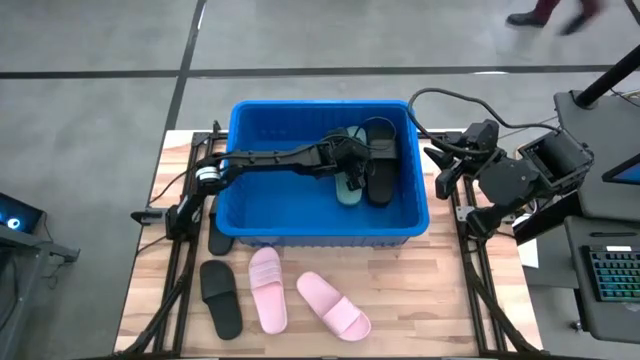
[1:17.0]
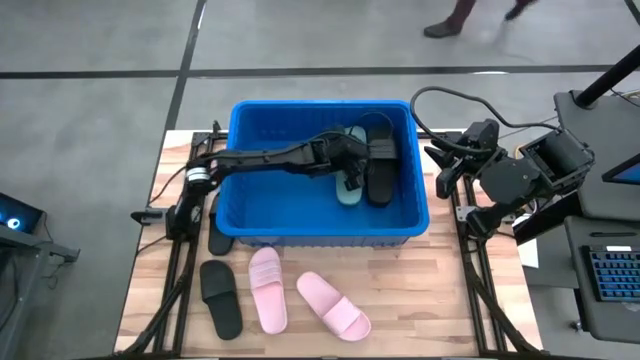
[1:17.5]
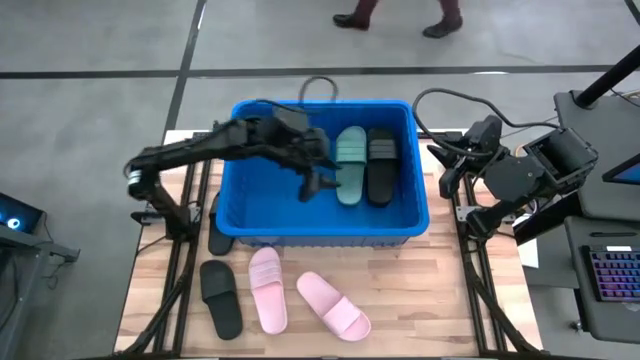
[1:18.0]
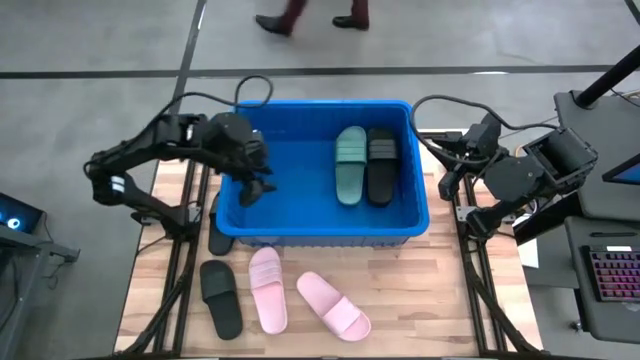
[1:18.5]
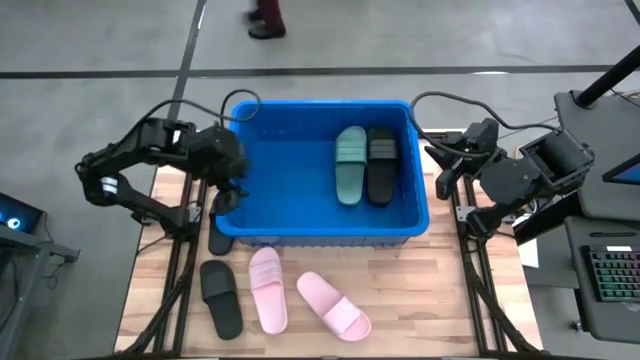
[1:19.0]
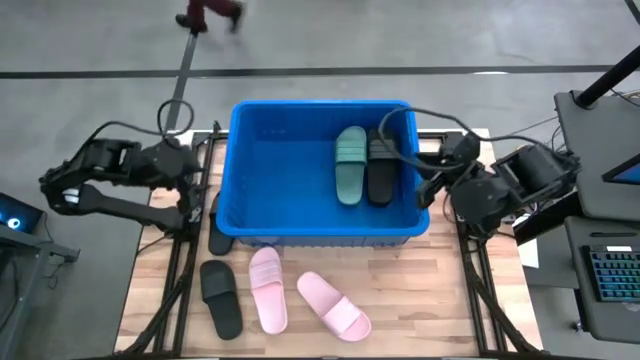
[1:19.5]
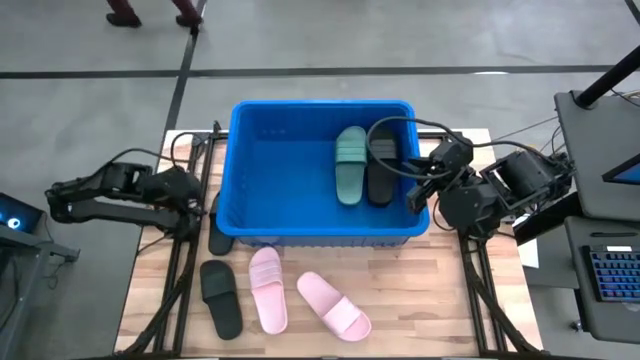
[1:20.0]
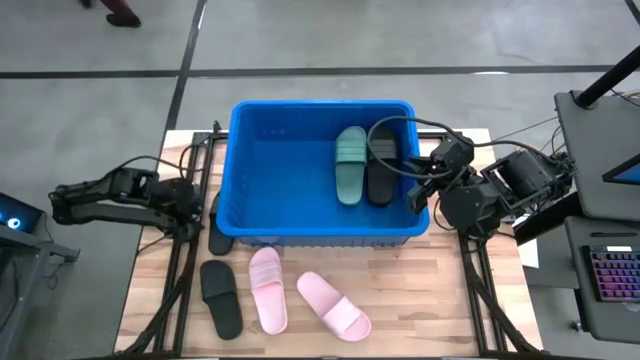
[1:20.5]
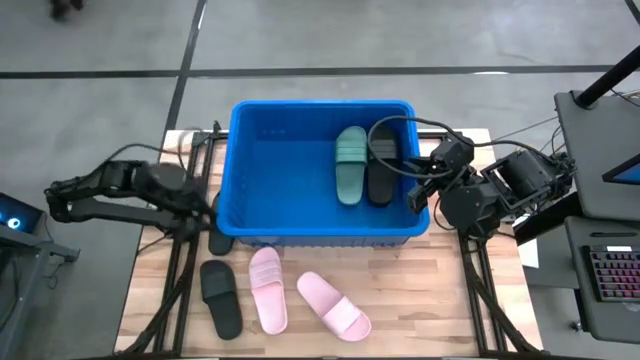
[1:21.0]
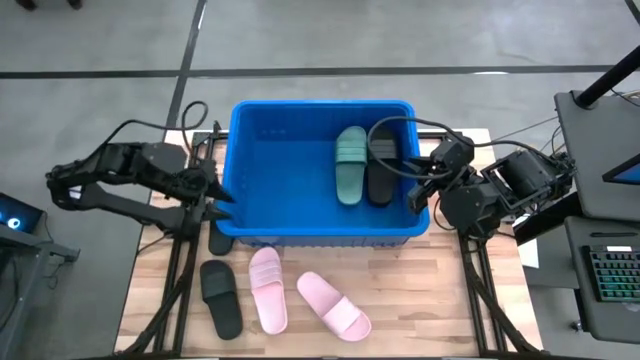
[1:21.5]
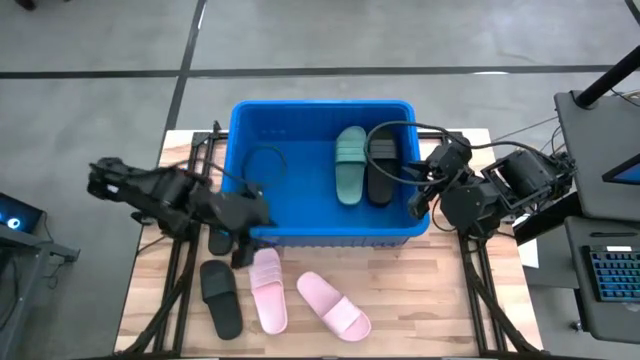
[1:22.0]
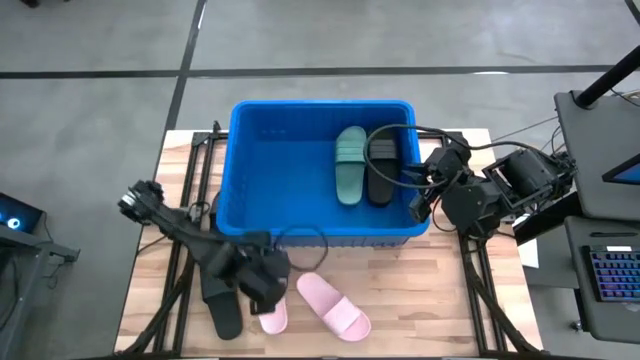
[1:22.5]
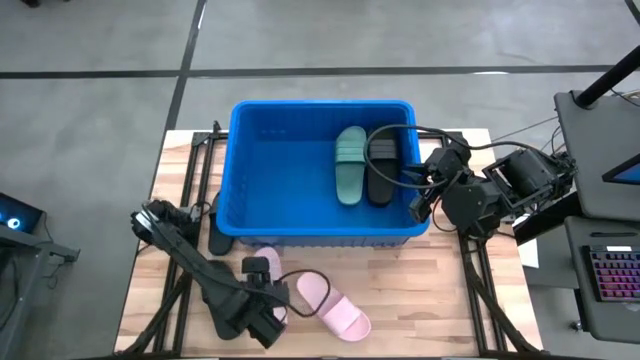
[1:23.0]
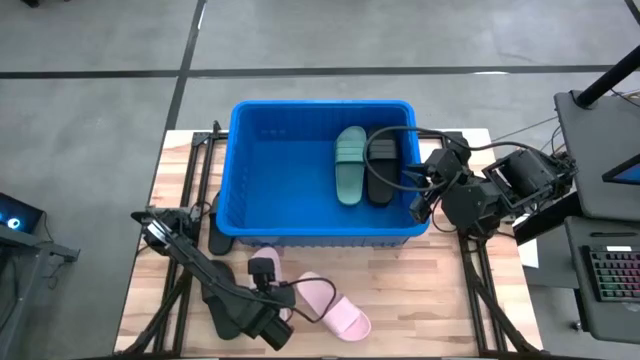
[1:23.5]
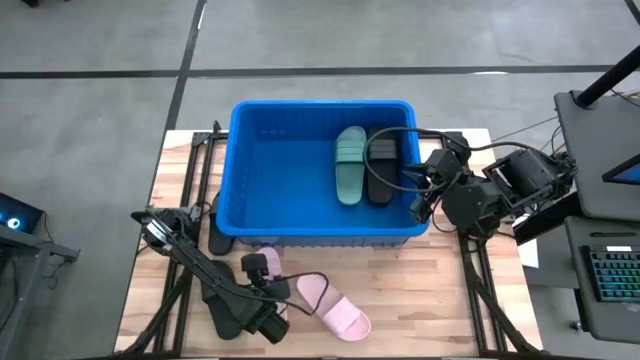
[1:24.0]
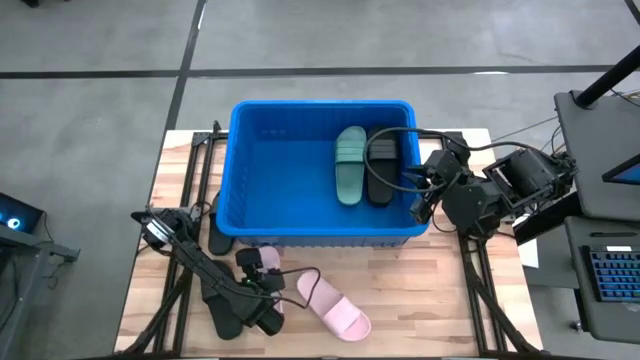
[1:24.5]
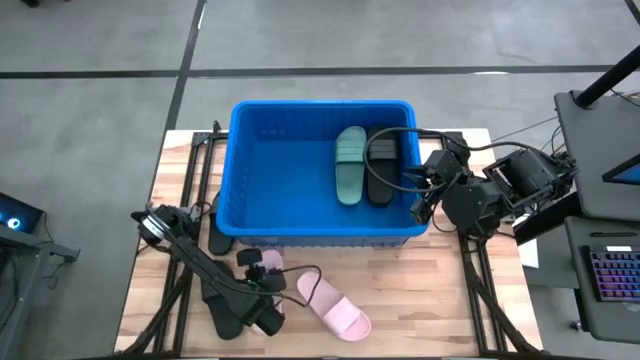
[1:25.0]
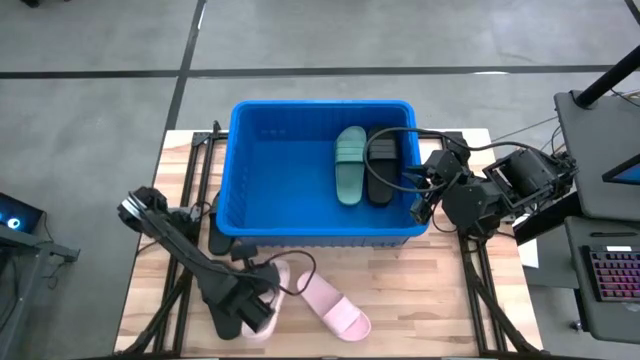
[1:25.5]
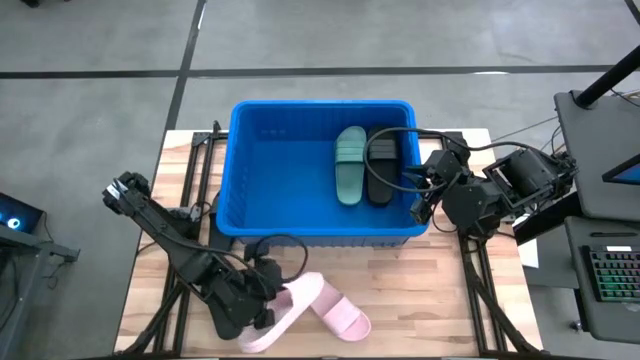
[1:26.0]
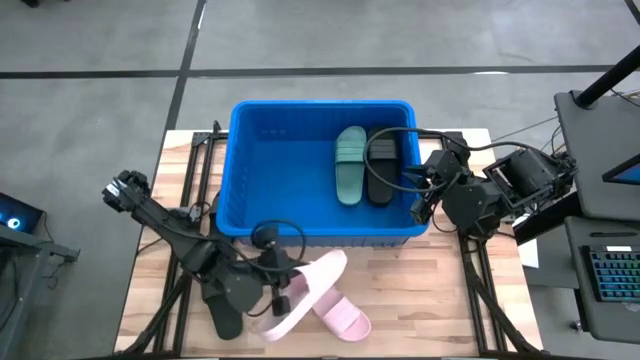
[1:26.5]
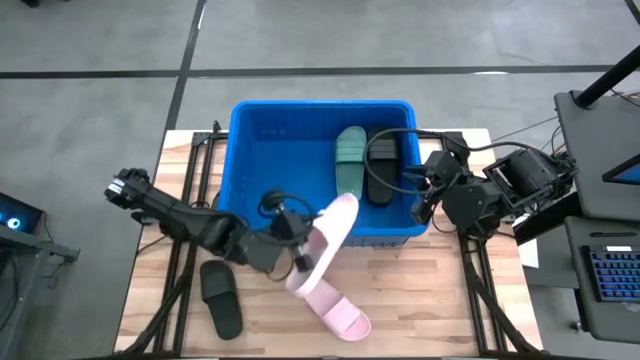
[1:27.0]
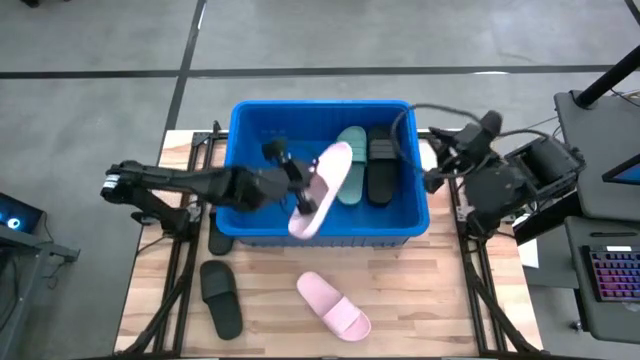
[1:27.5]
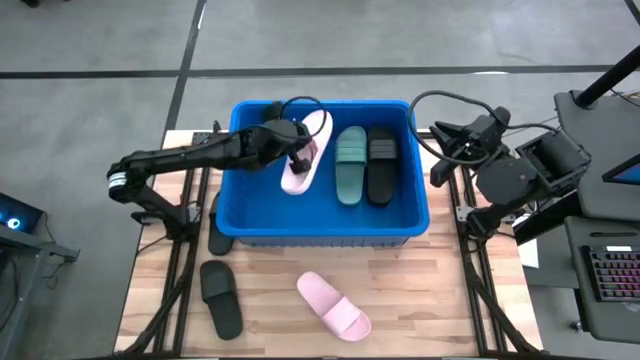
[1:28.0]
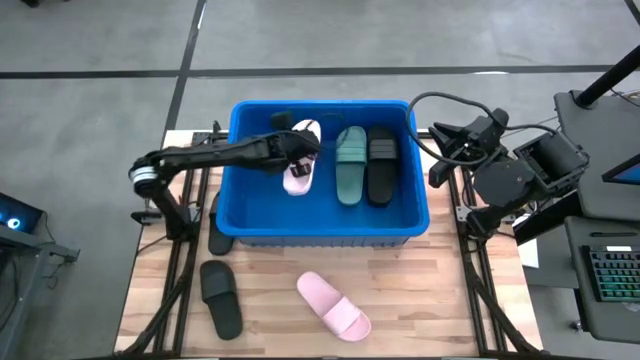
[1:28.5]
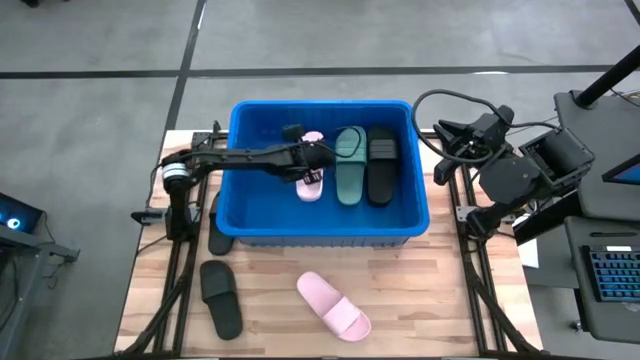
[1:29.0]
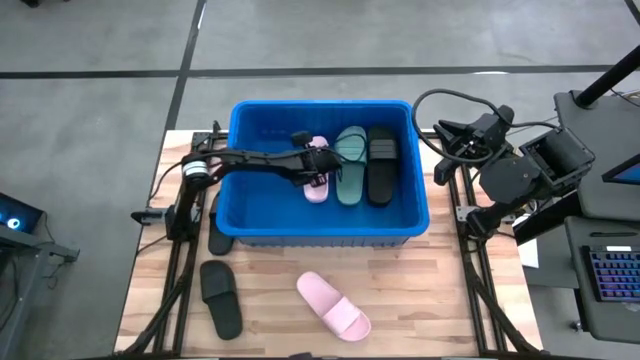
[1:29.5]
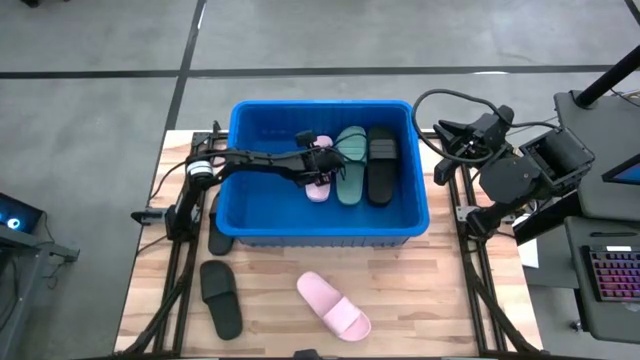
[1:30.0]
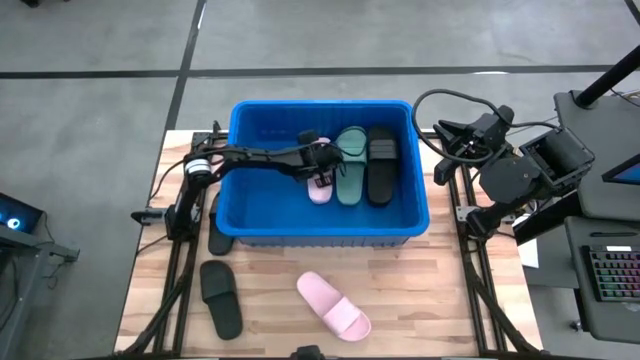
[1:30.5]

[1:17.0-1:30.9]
Task: Pick and place slides into bin
Put the pink slide into the blue bin

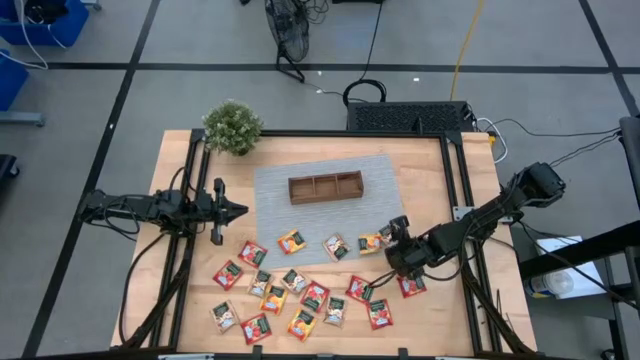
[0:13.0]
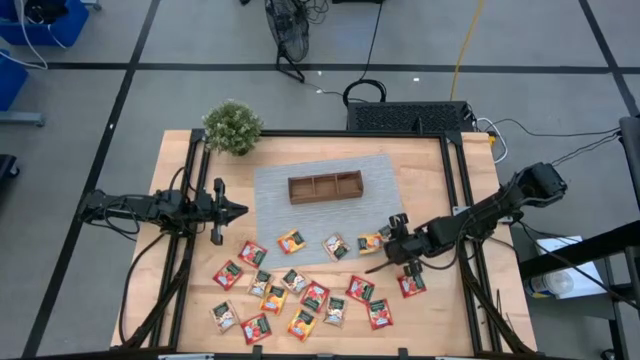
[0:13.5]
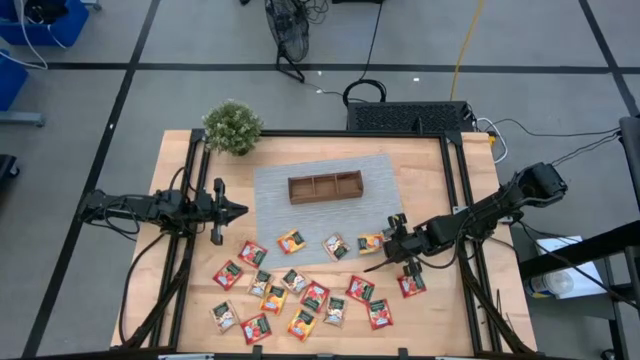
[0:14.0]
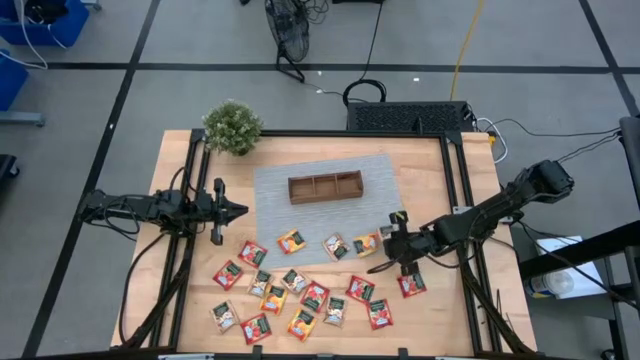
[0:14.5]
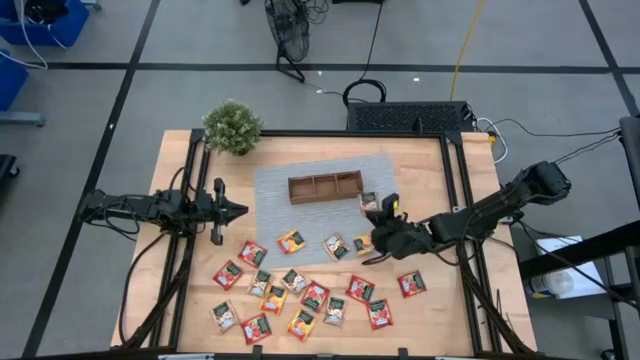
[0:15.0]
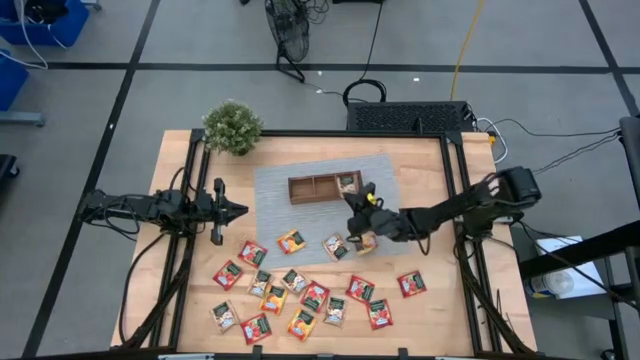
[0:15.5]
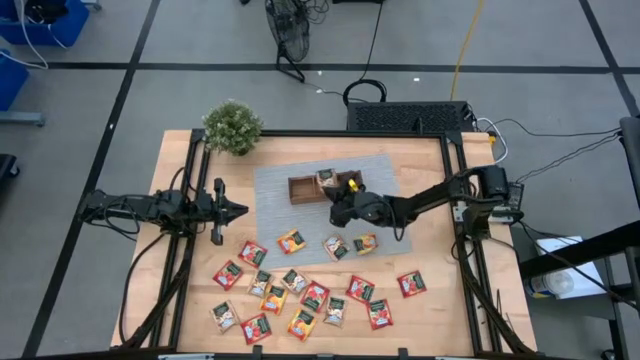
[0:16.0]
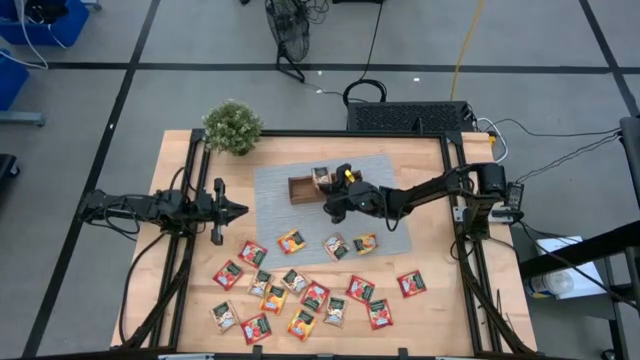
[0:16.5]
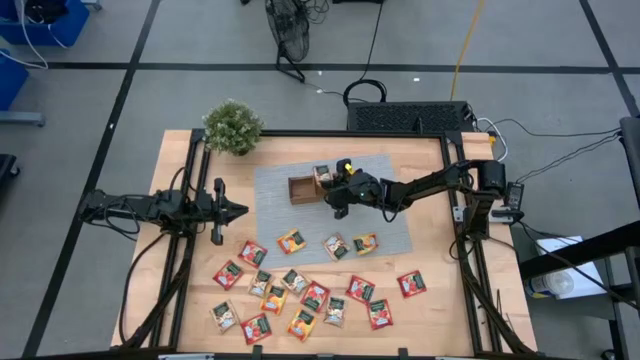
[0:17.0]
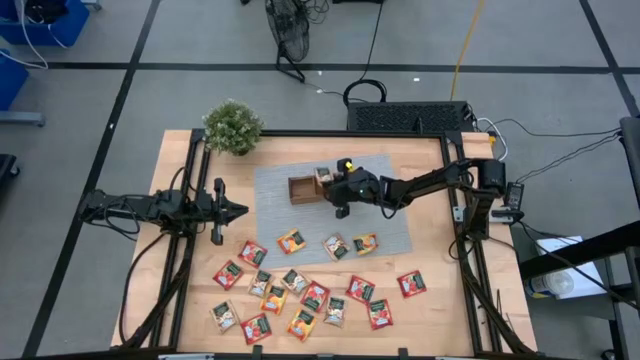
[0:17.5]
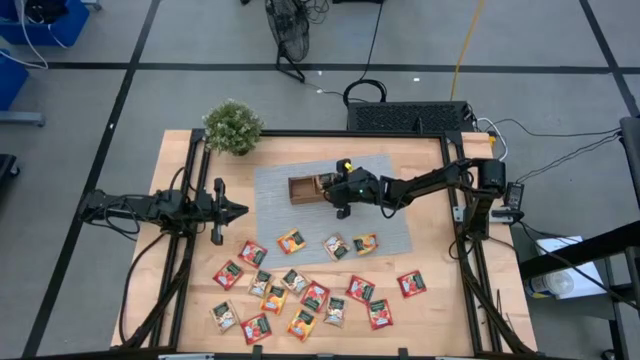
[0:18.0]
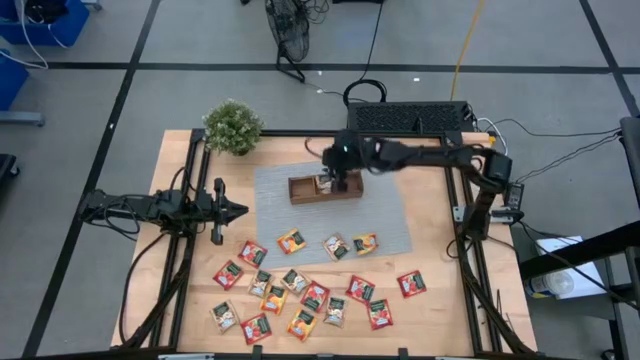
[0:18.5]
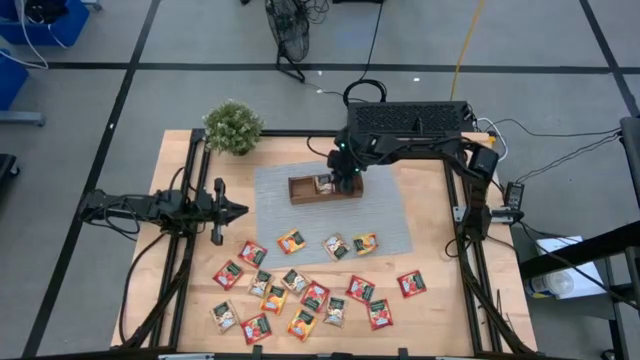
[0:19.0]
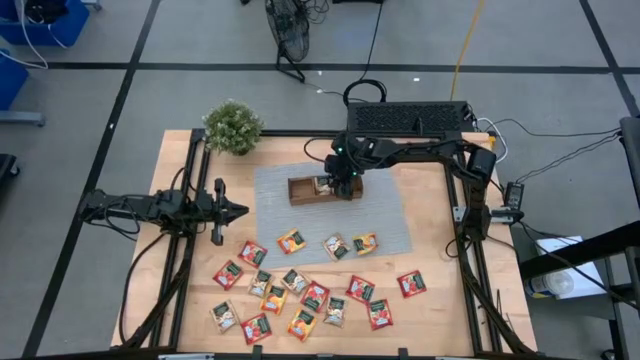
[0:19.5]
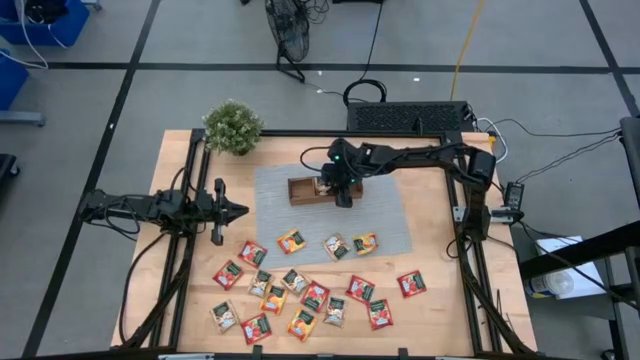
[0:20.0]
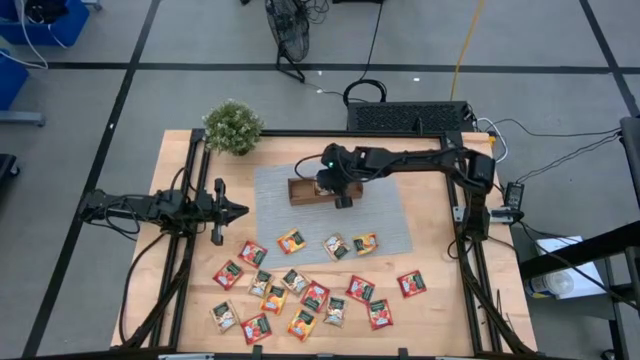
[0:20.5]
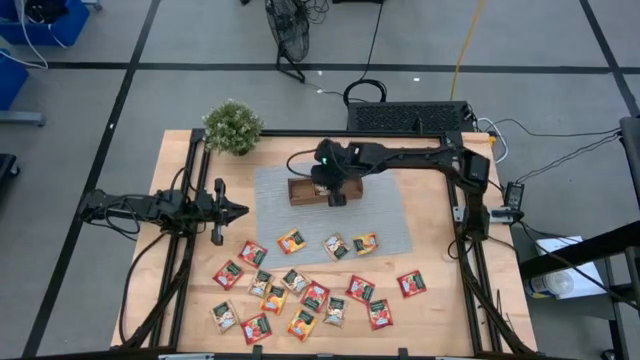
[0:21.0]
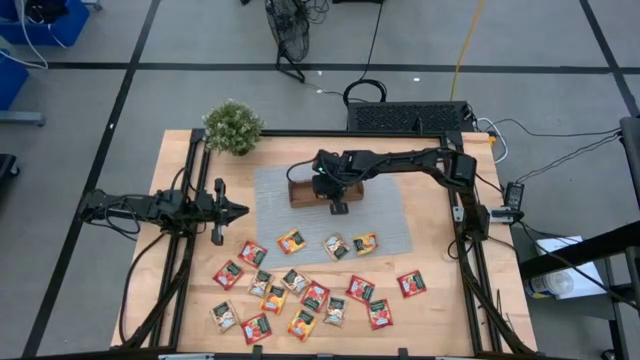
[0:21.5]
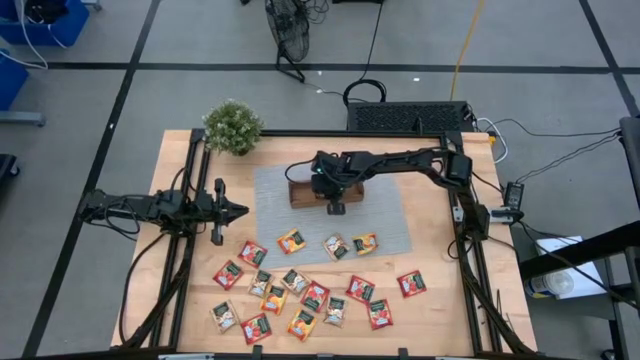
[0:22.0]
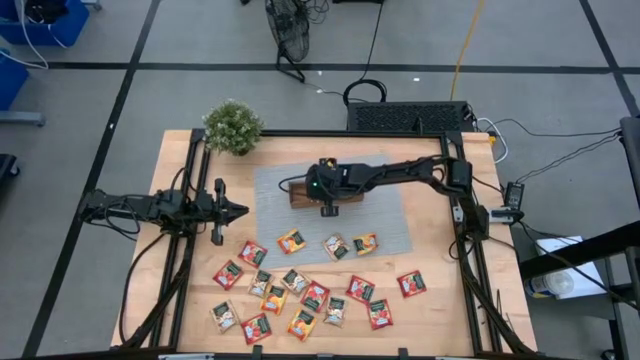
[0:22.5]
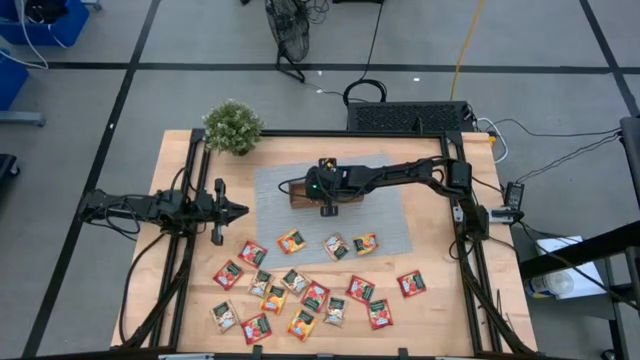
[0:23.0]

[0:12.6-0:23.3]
Task: Pick & Place Tea
Put the brown tea bag into the middle section of the wooden organizer
